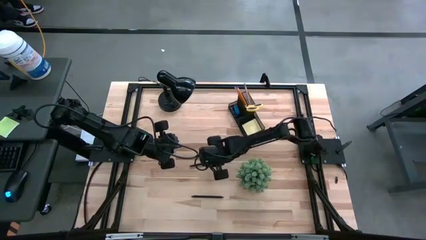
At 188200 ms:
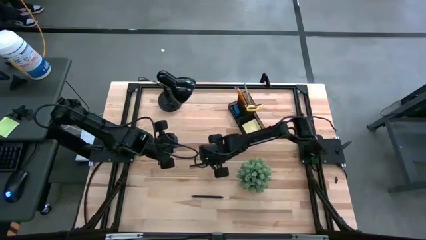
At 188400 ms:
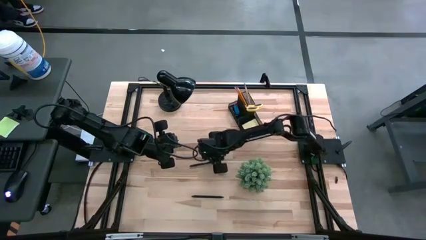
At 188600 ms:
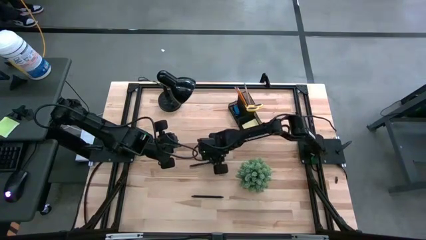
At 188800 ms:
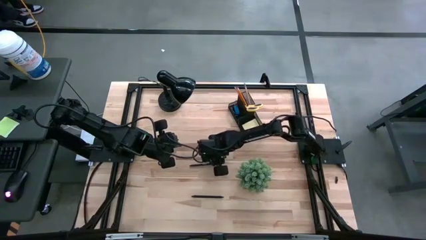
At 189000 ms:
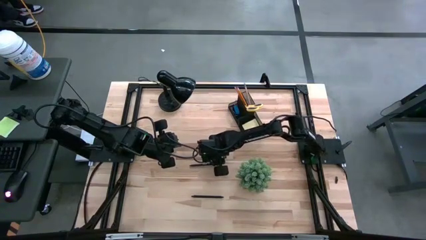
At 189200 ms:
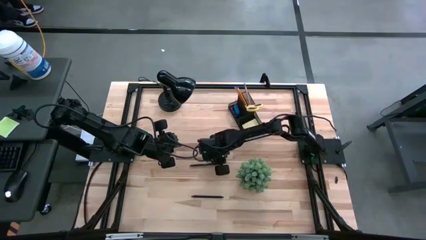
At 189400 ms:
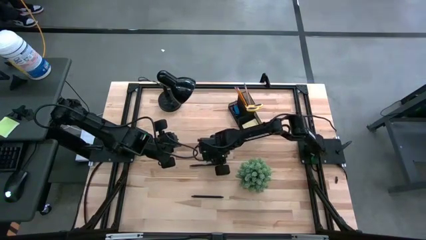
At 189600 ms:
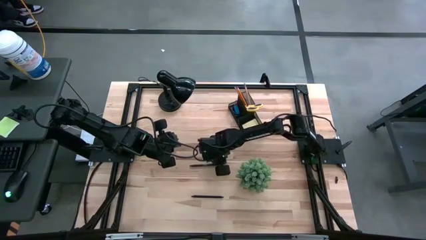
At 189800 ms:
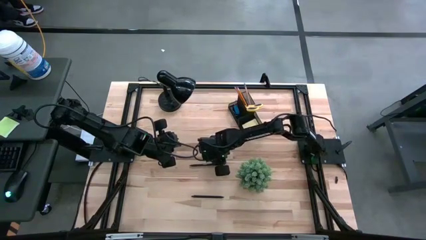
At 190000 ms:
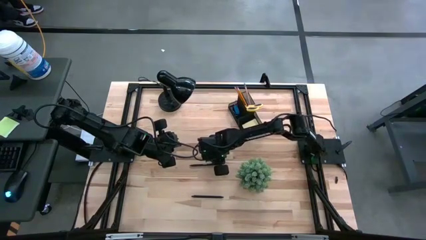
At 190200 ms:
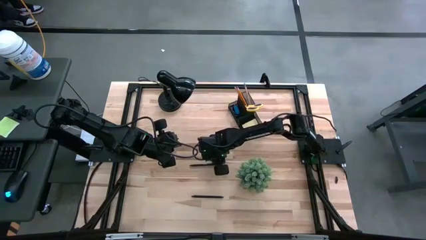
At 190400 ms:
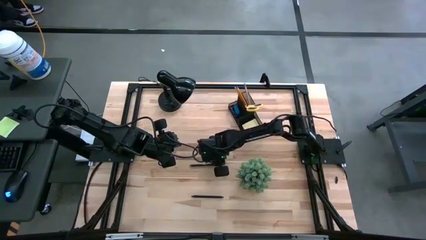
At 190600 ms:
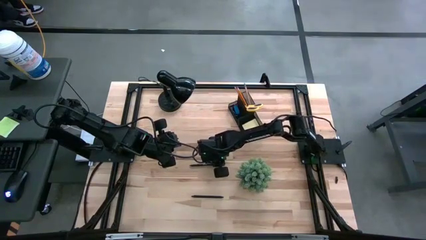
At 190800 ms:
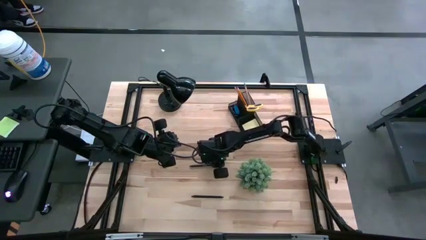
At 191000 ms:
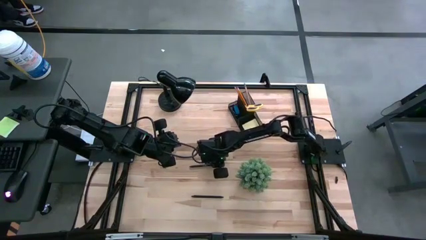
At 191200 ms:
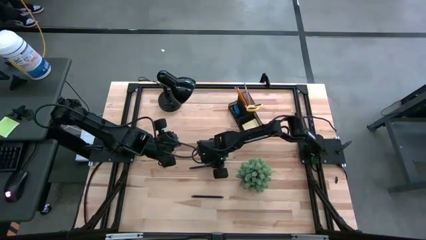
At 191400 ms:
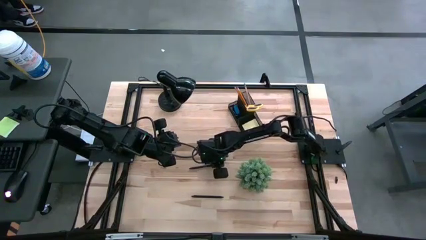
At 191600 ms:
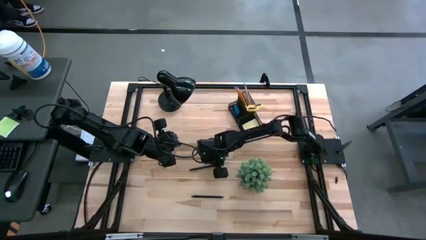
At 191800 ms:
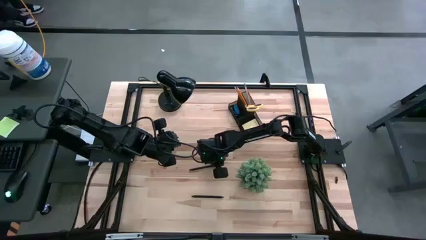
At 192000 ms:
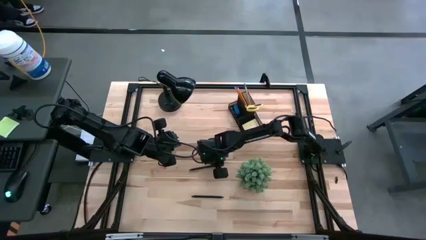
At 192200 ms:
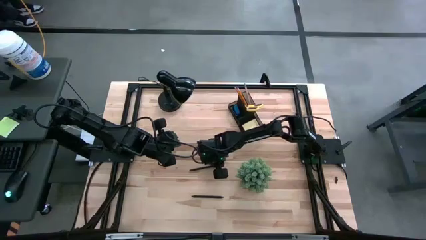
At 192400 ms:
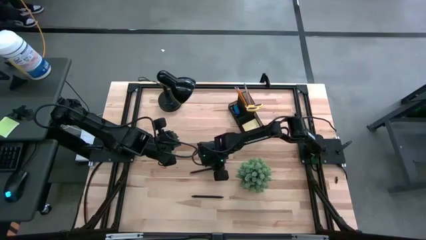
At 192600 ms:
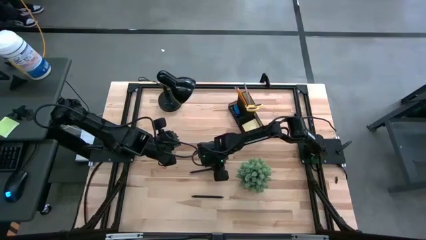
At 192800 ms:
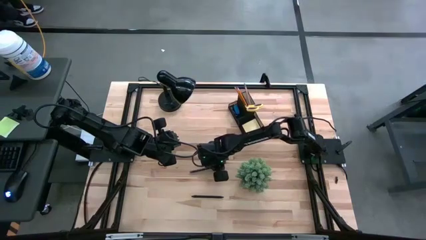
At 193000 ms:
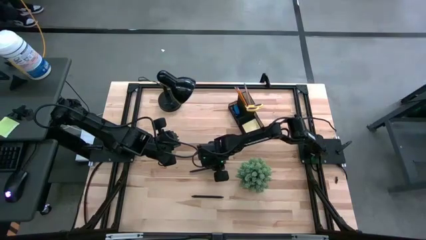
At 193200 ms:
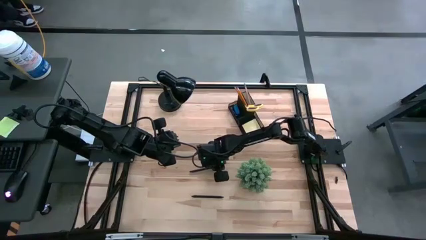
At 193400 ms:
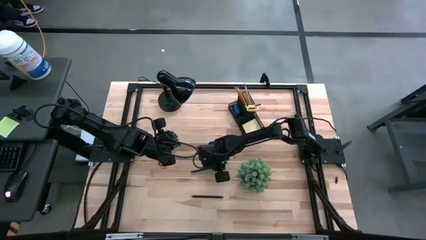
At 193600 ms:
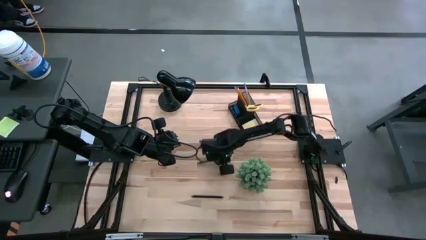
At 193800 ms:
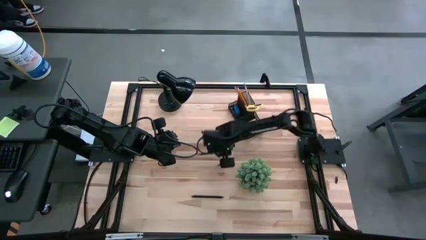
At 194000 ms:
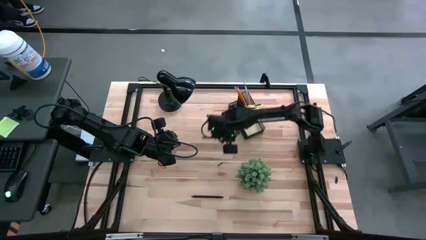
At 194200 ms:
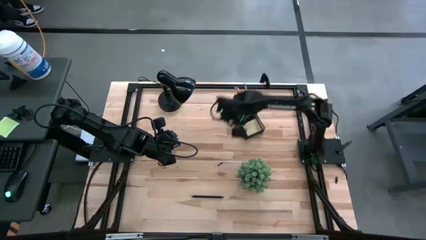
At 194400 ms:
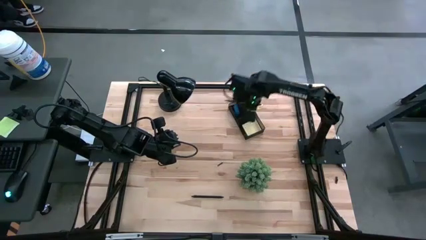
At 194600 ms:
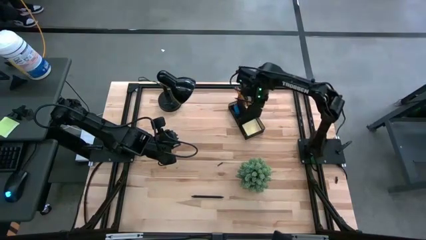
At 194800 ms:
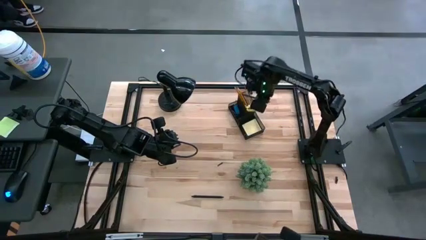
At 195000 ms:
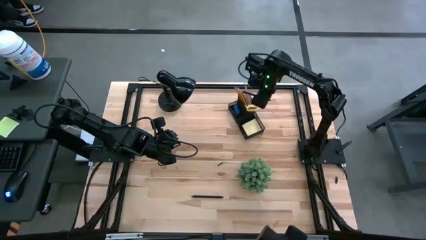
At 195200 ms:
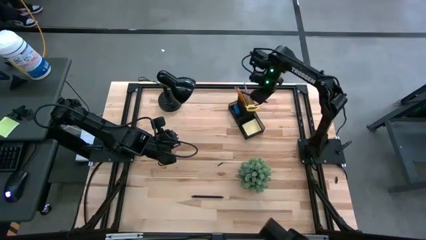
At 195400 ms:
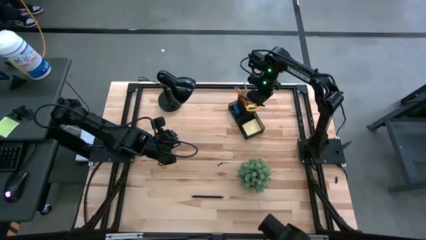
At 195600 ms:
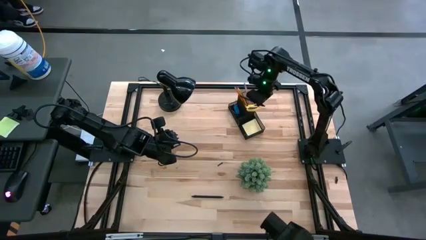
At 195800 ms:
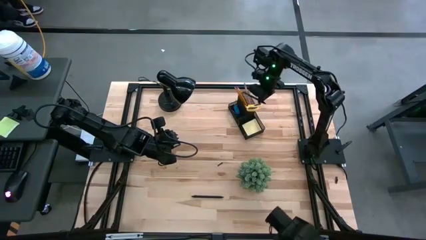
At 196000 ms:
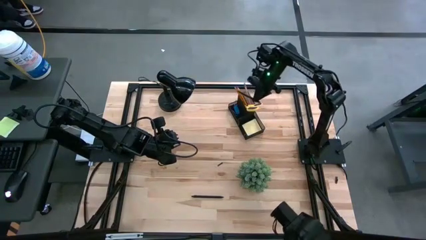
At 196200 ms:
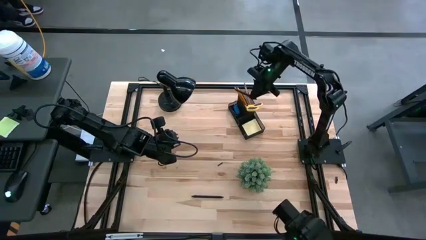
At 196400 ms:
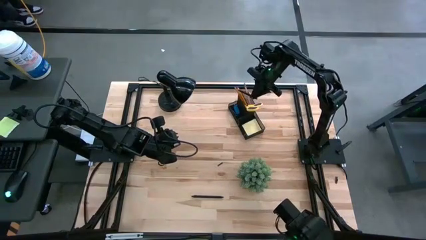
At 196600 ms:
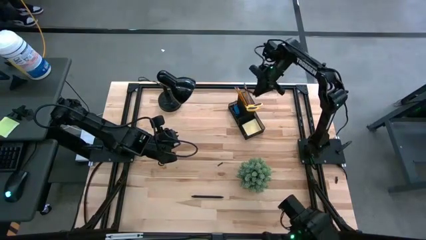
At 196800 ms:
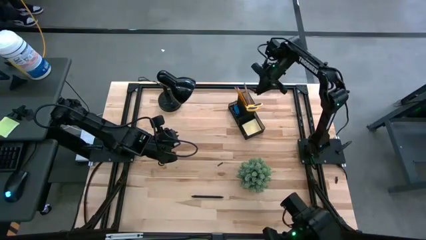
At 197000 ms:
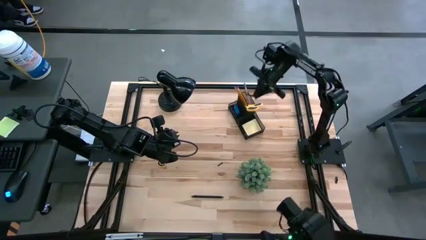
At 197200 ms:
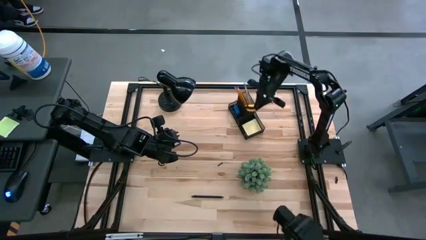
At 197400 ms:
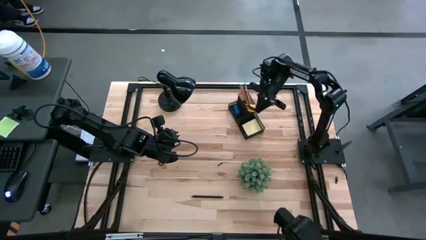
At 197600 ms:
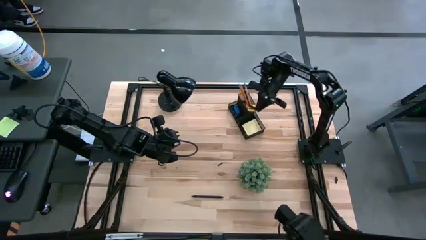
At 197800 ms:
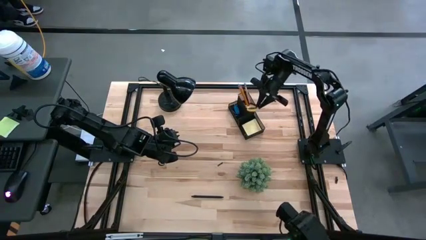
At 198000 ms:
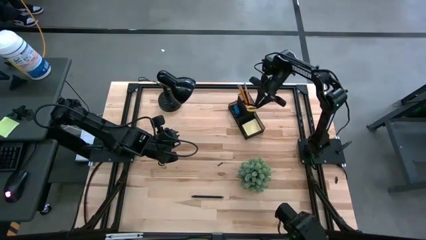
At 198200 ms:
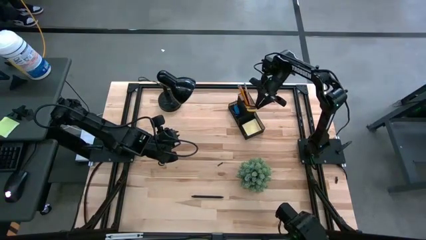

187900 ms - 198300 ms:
Task: Pick and place office supplies into organizer
Put the top black pen into the desk organizer

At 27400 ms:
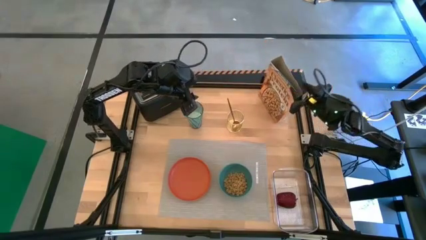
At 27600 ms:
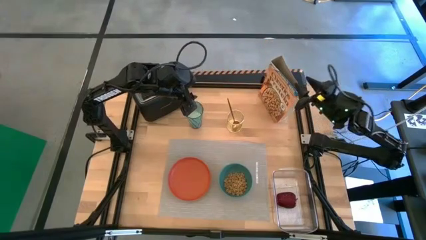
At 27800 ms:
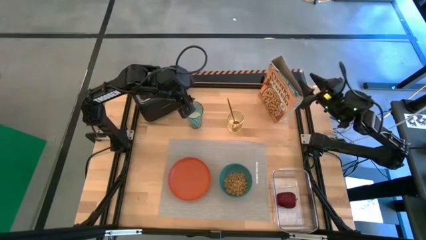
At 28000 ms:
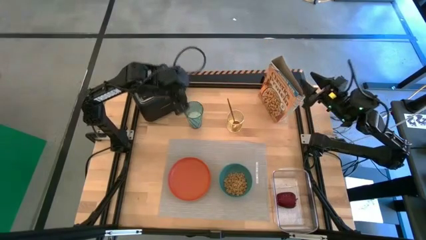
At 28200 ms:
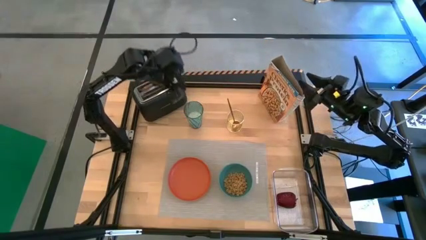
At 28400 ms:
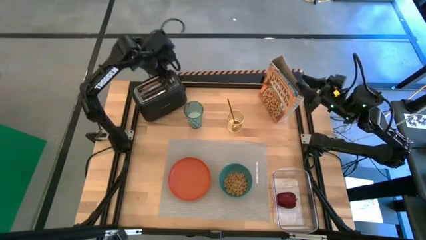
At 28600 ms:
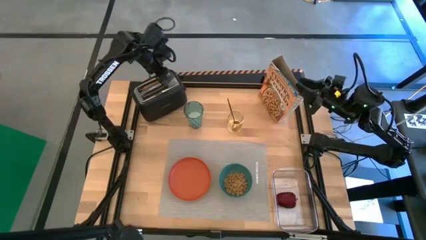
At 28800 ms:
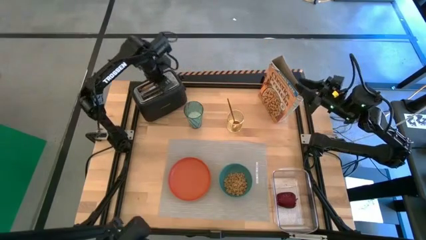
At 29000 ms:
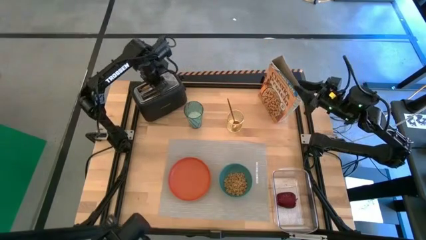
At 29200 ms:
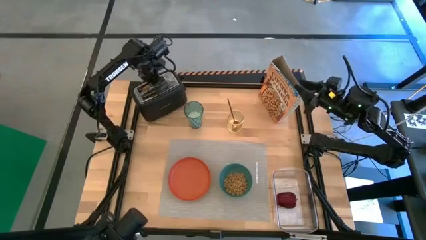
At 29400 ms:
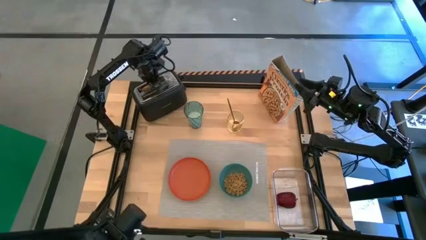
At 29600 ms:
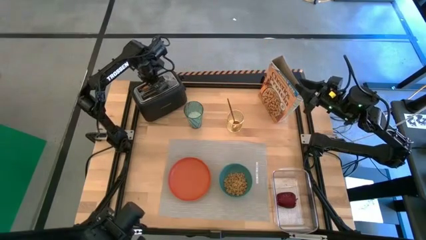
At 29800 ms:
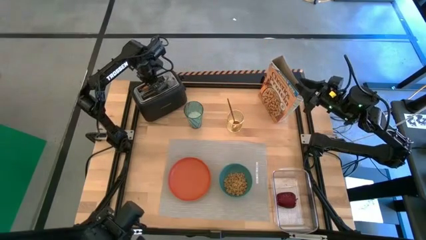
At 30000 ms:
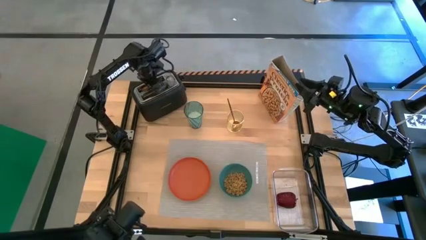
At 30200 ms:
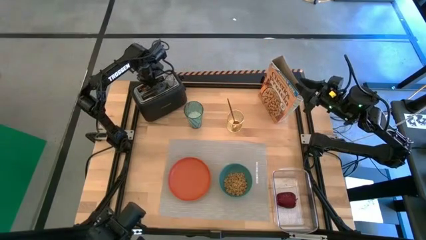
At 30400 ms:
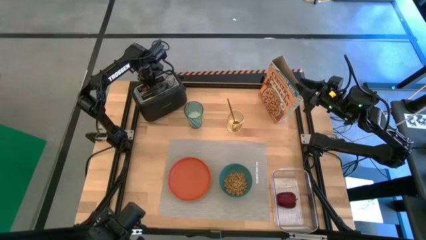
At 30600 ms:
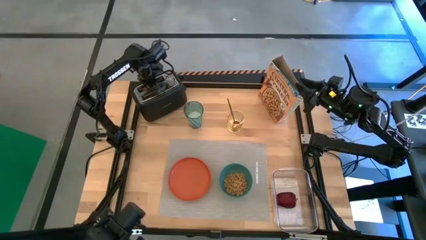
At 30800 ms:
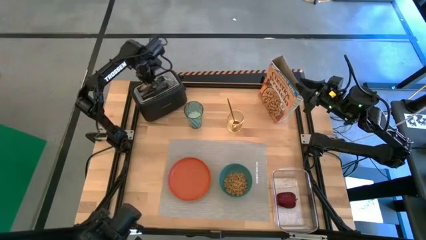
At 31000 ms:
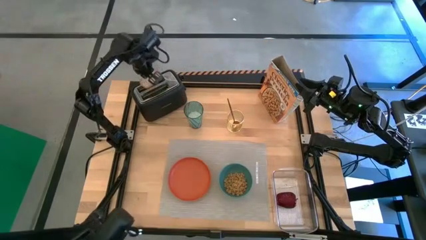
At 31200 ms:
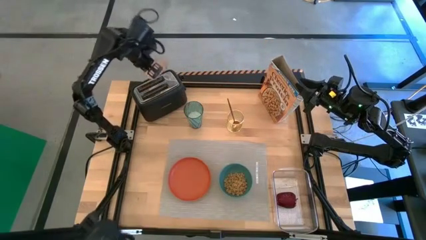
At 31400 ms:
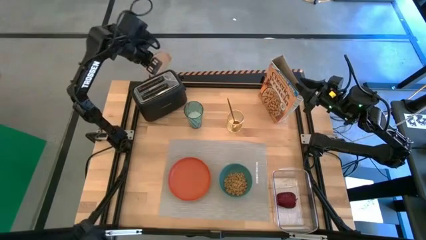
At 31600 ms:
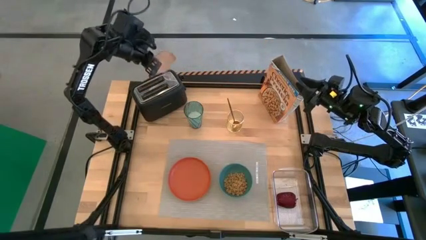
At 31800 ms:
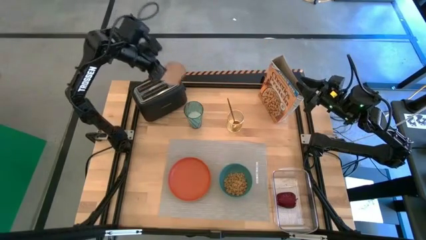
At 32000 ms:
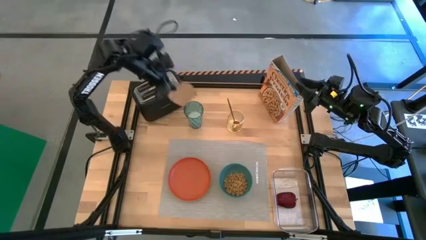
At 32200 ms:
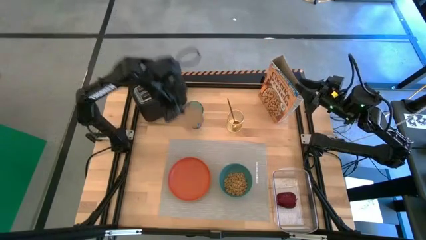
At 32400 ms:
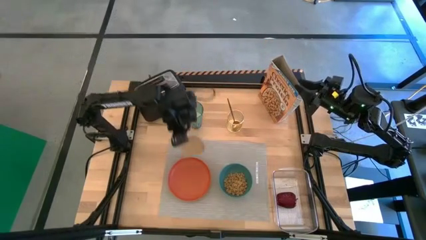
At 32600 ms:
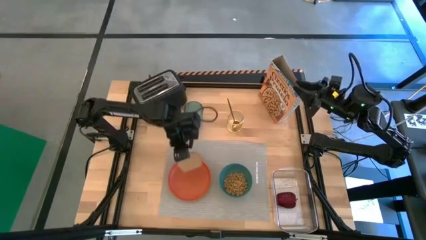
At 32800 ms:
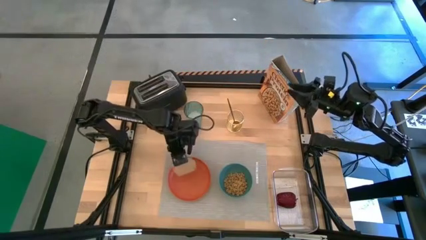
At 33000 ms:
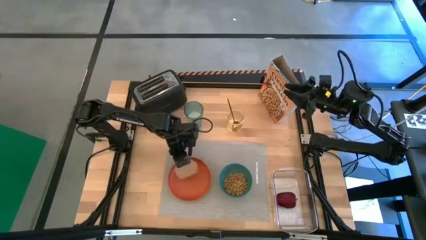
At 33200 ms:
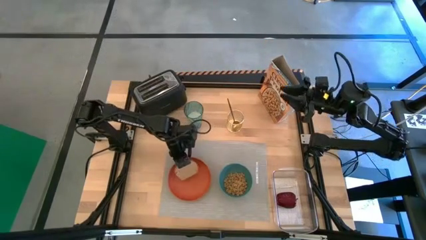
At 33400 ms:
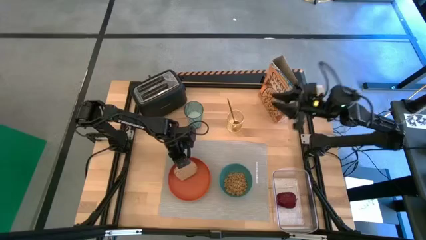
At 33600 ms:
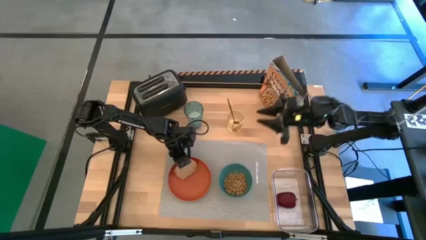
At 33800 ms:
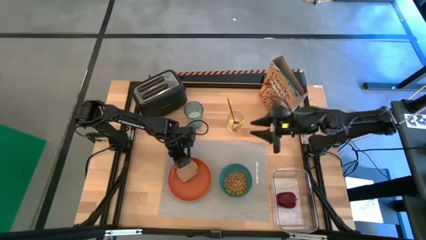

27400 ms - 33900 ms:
Task: Arrange a breakfast setting
Put the toasted bread on the orange plate
